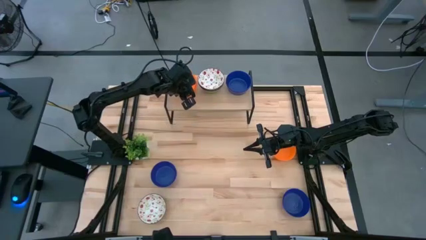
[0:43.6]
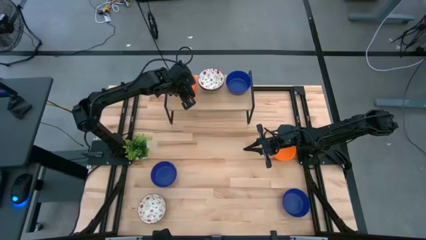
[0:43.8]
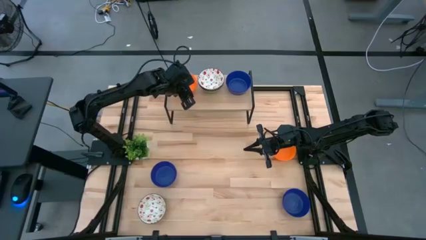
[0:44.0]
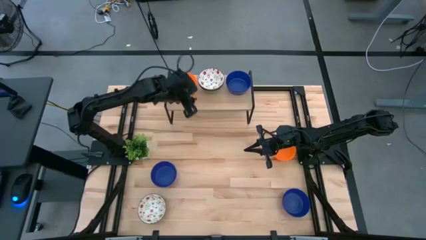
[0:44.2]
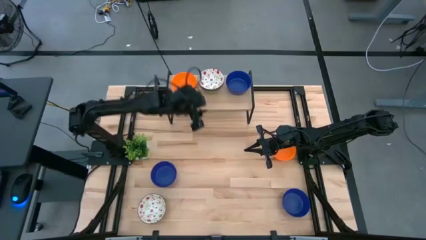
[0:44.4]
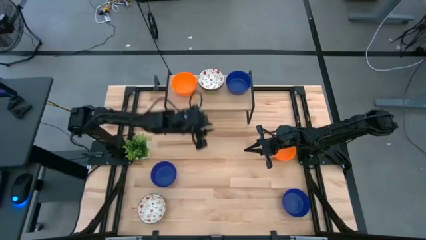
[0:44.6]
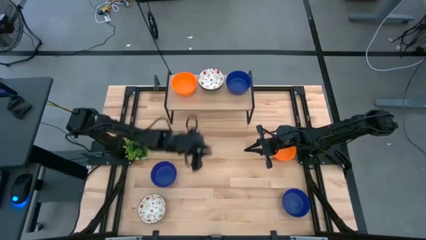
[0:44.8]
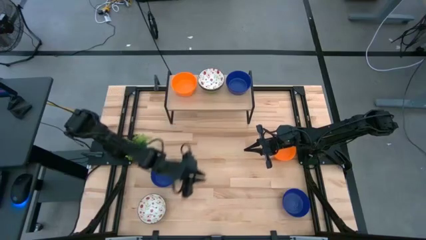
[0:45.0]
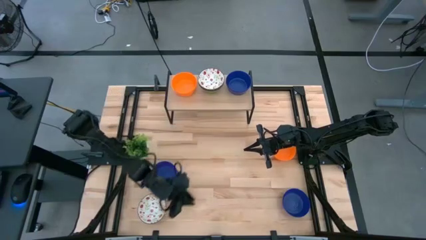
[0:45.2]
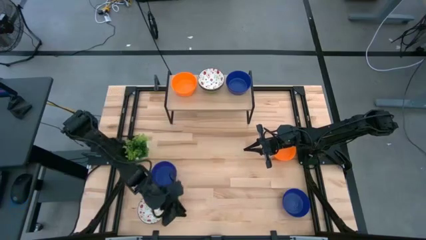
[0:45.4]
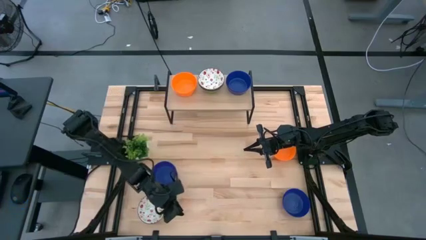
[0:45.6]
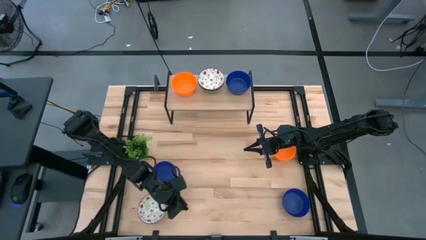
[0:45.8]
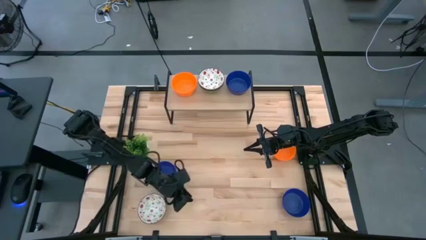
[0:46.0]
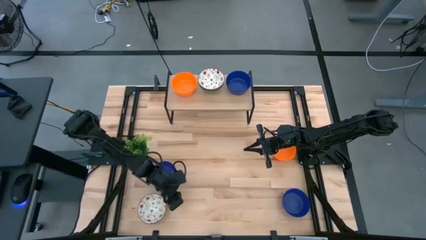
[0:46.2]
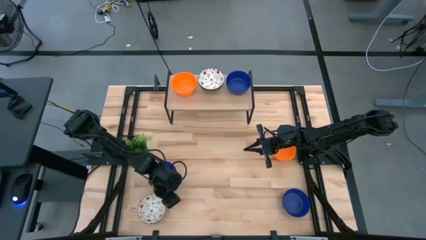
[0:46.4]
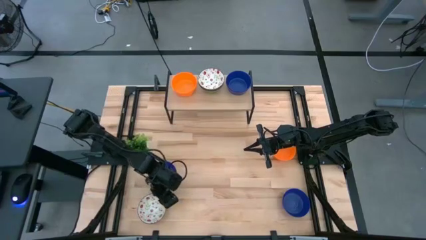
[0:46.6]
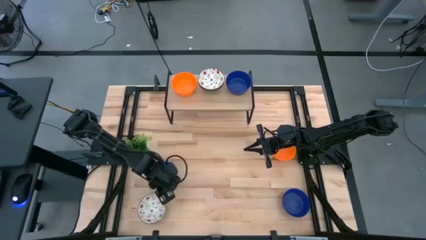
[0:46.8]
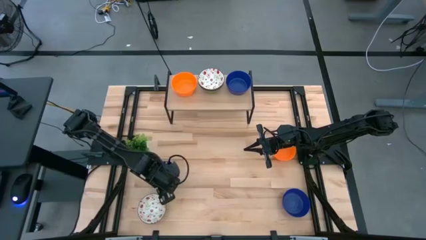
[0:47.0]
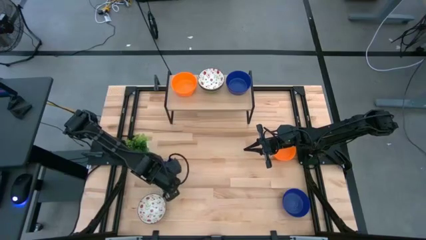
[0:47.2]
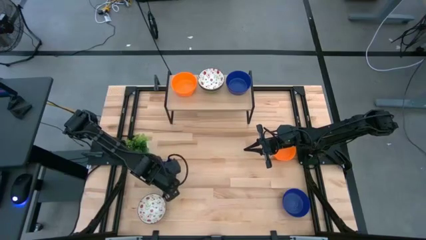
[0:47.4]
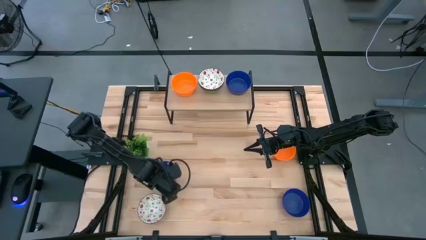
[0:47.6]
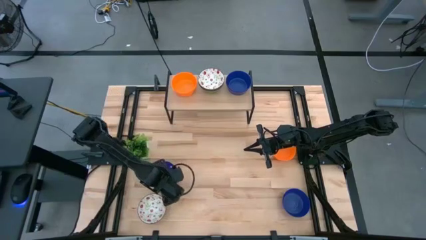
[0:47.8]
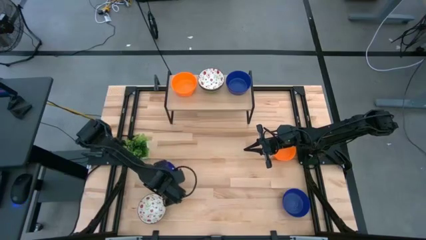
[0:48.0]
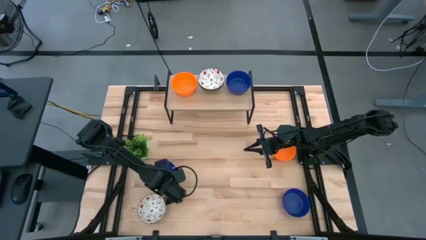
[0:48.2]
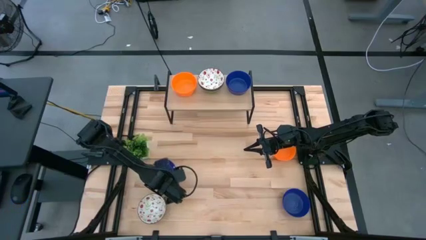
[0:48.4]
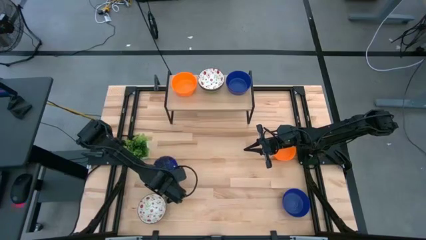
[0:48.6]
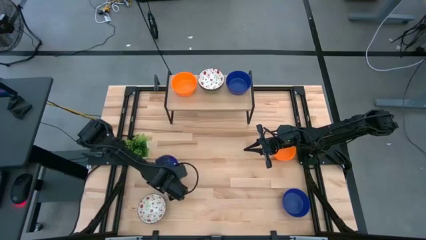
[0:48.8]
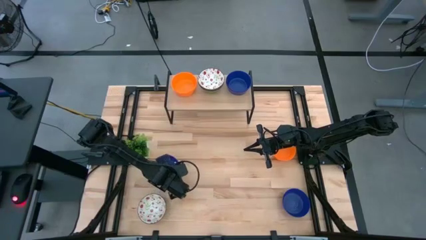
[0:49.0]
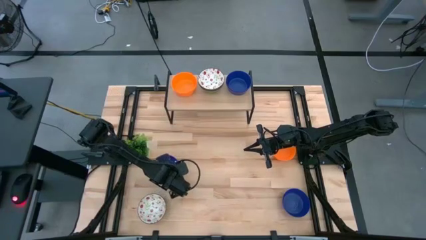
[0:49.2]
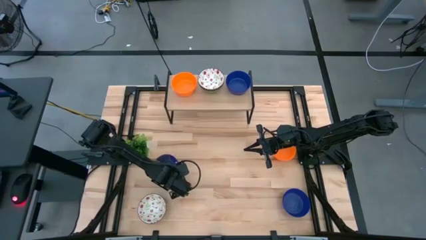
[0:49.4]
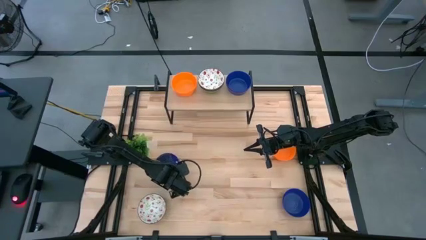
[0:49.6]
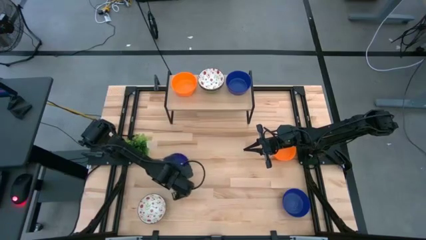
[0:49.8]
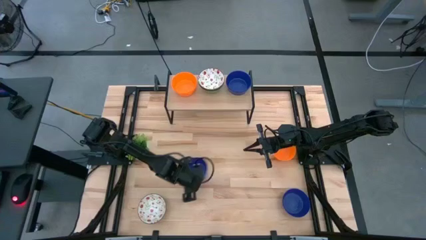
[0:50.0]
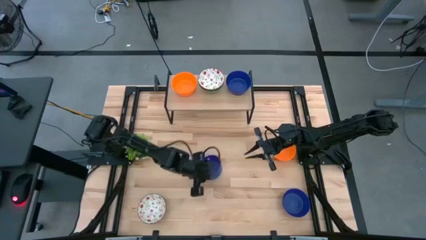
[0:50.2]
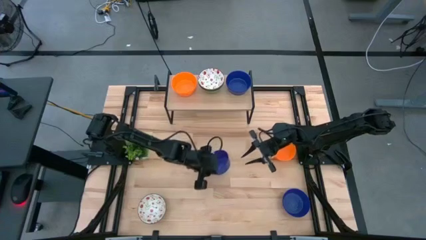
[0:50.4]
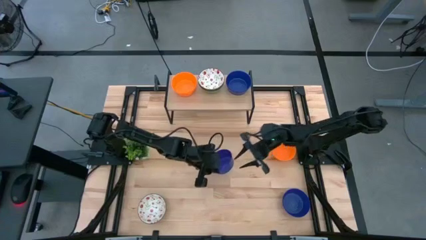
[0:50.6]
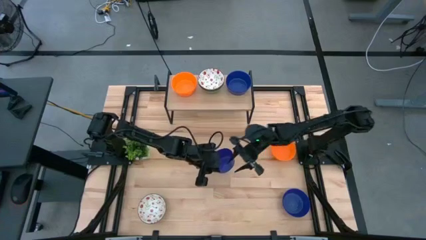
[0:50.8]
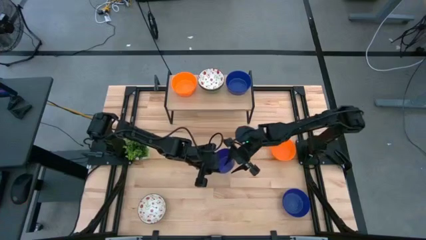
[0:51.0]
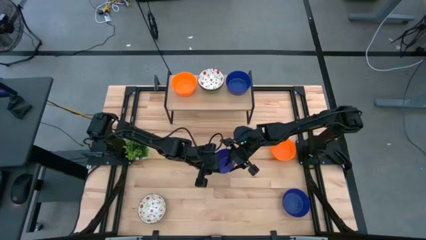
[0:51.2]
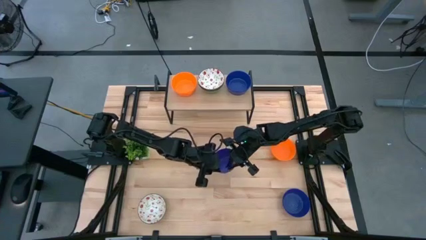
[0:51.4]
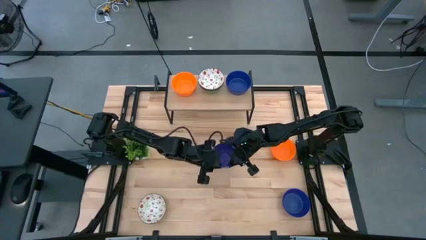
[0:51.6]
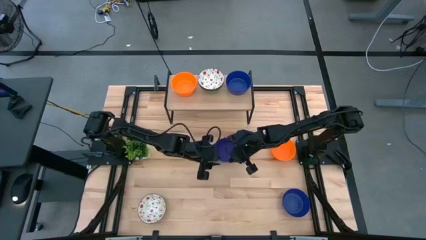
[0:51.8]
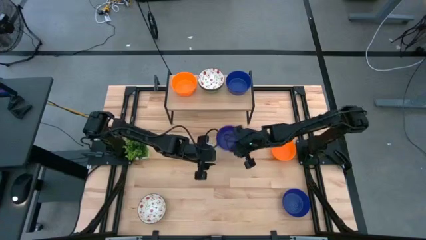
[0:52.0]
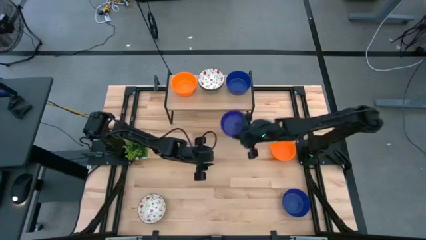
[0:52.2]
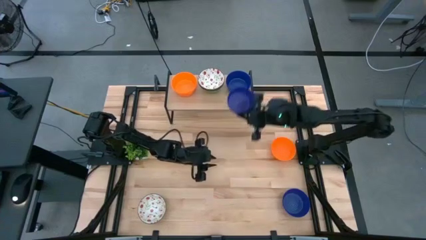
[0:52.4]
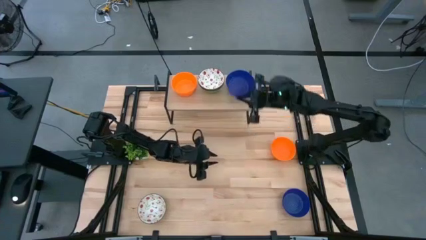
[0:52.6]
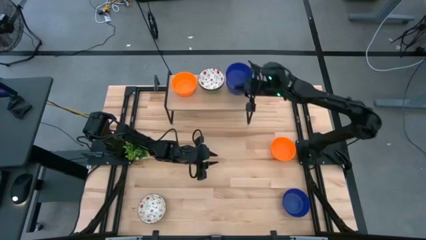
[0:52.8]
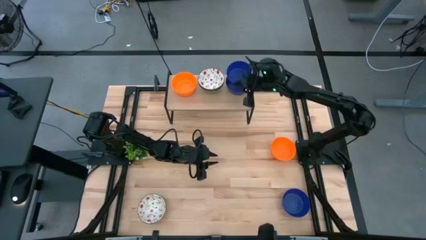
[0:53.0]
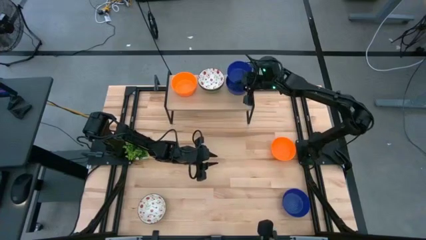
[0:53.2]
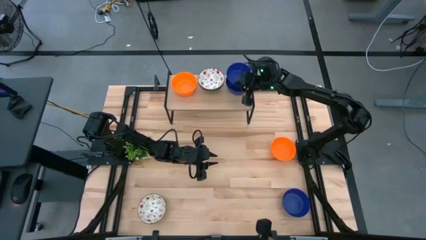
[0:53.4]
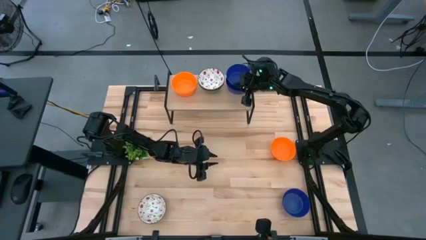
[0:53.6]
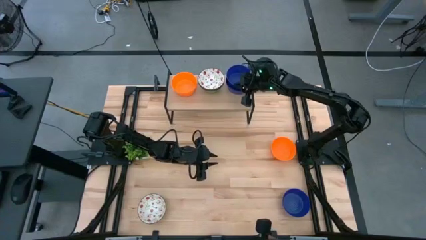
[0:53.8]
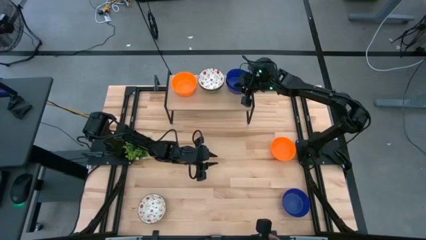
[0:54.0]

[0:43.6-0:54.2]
Task: Pick & Place Mini bowls
Stack the blue bowl on top of the other blue bowl on the shelf

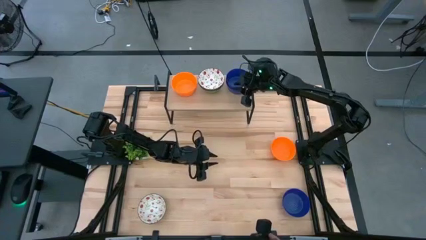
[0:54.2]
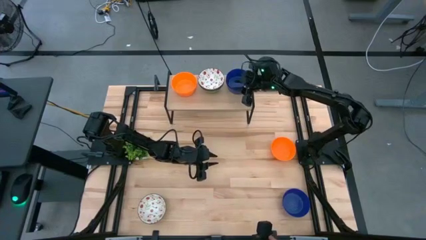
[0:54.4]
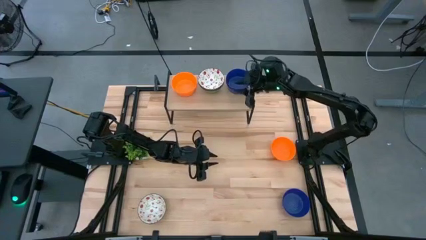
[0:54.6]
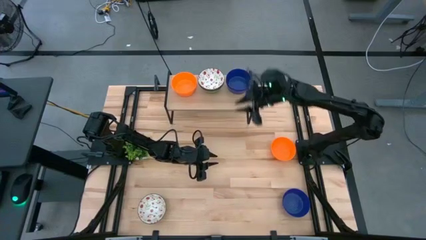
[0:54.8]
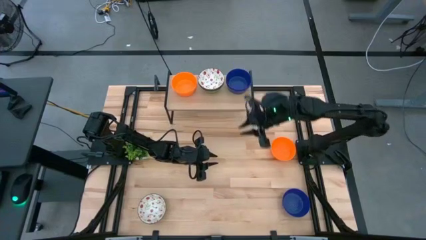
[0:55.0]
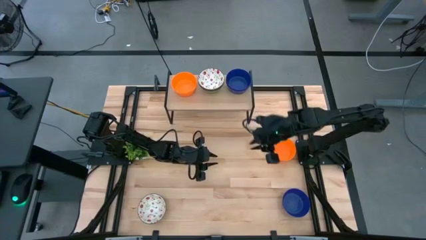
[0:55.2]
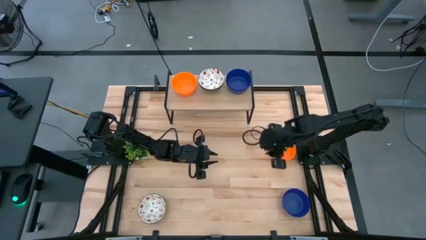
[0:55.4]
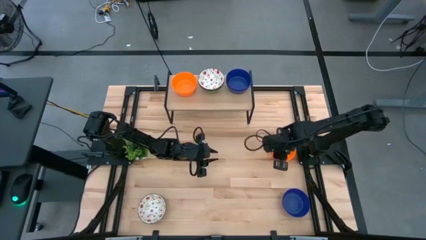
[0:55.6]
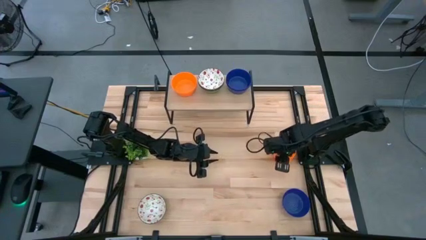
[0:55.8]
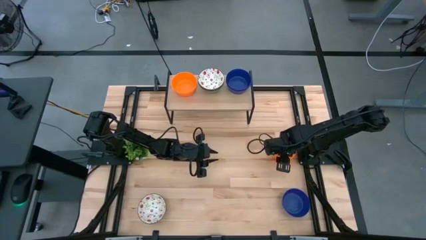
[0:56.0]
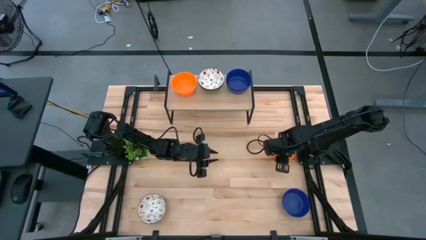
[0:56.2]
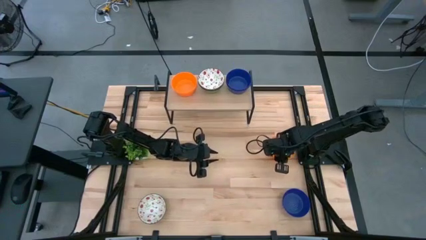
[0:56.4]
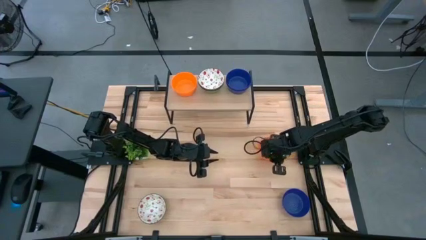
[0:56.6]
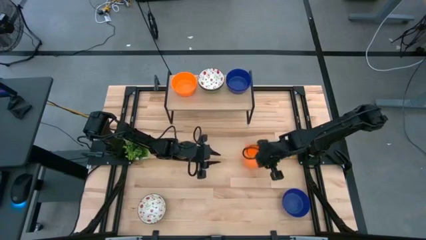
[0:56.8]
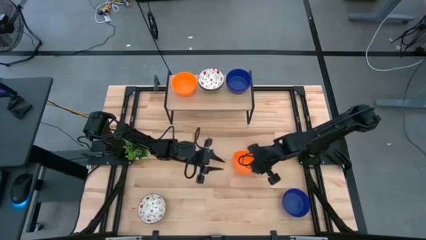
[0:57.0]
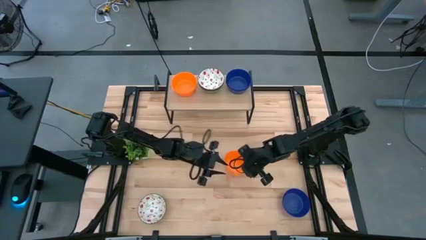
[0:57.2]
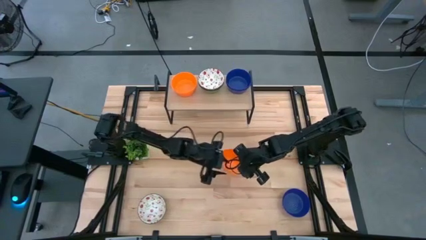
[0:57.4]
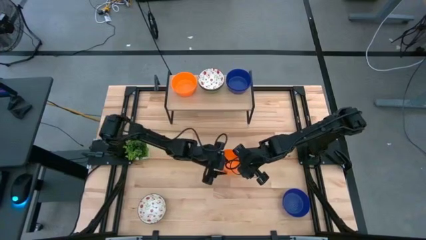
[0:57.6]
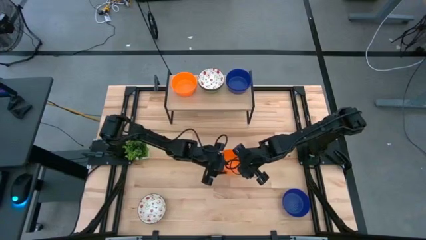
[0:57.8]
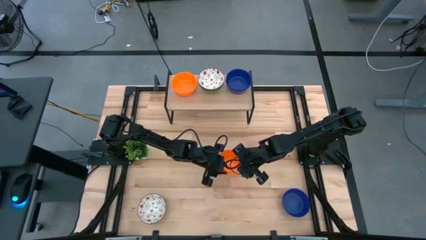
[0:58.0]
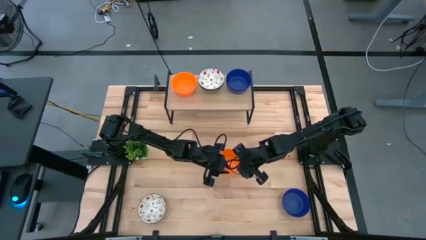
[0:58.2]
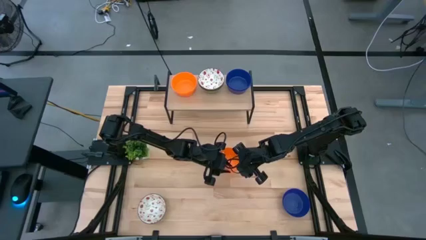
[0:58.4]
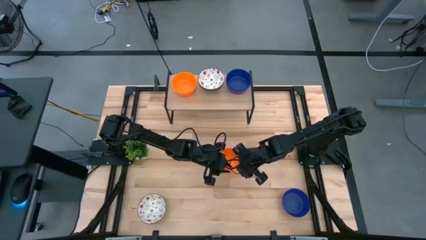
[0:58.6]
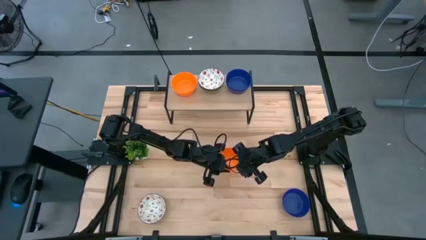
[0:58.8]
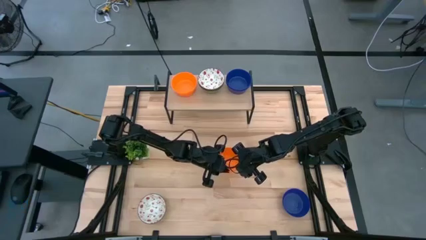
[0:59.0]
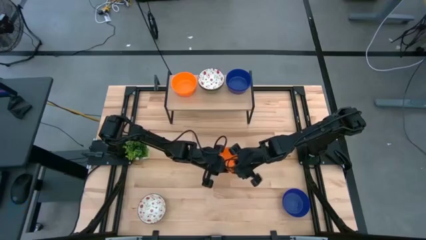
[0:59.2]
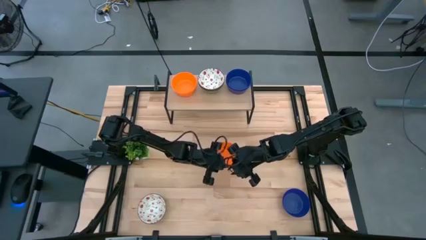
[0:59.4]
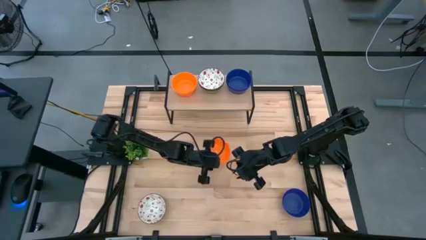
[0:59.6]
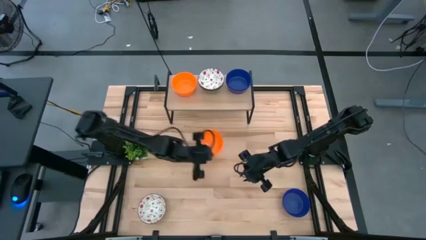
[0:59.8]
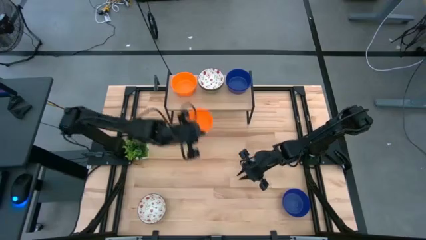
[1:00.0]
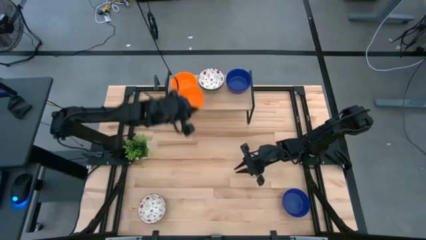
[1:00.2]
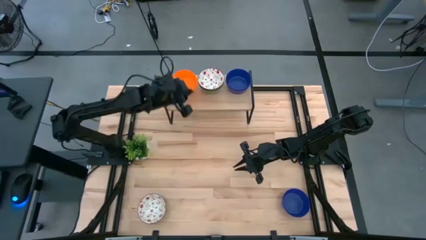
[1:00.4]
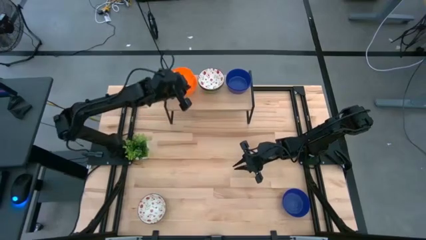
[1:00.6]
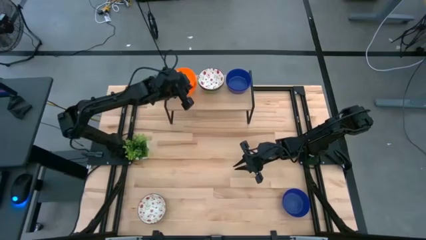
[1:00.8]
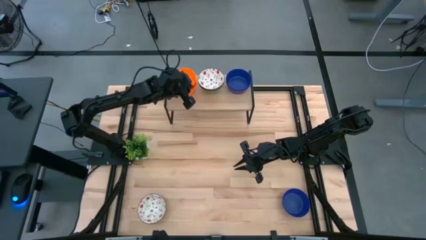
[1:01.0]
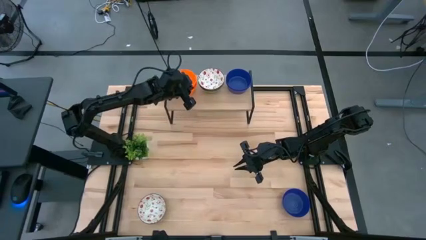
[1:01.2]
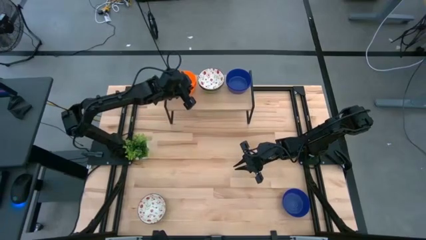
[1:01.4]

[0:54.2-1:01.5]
Stack the orange bowl on top of the other orange bowl on the shelf
